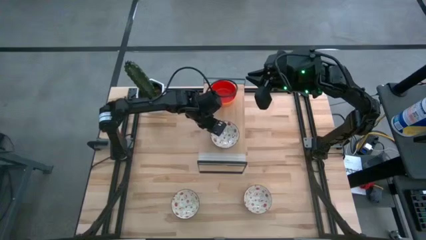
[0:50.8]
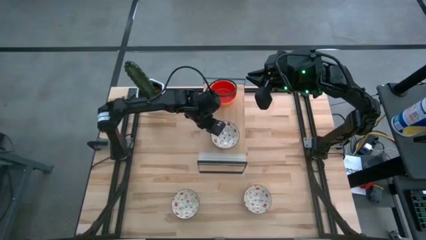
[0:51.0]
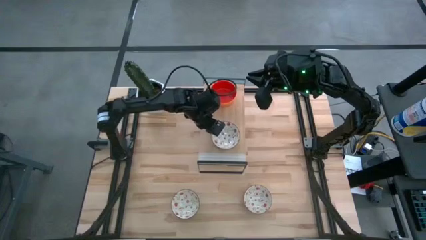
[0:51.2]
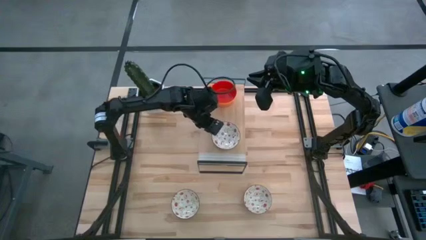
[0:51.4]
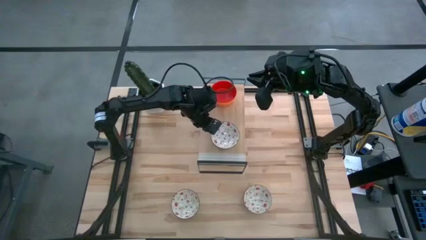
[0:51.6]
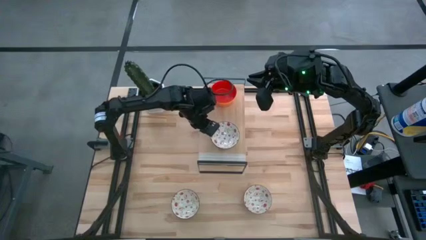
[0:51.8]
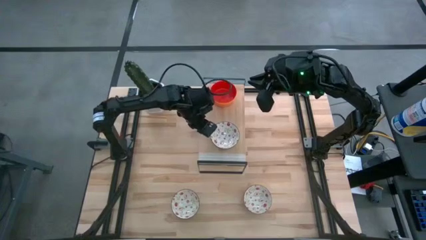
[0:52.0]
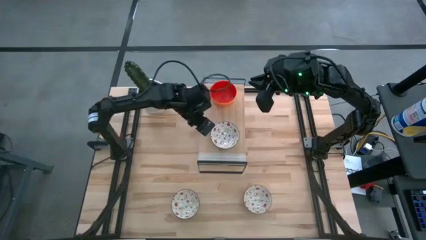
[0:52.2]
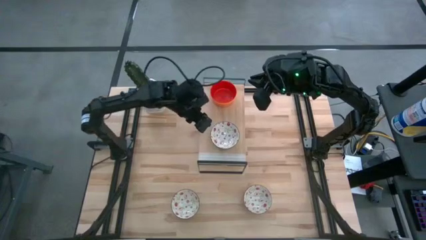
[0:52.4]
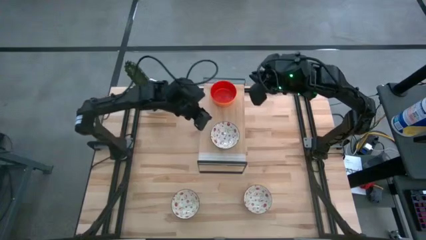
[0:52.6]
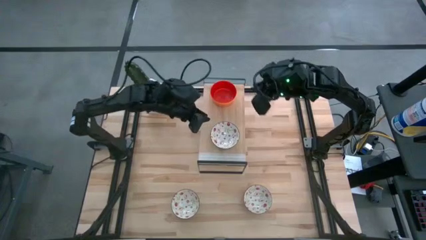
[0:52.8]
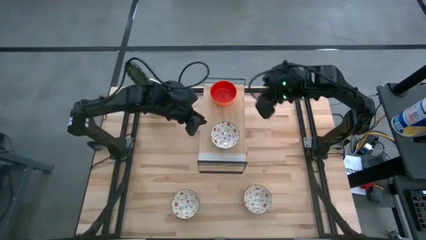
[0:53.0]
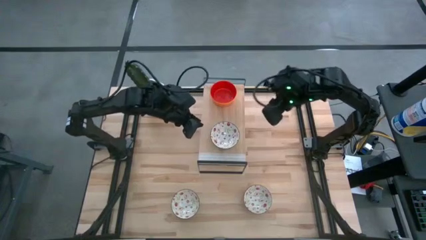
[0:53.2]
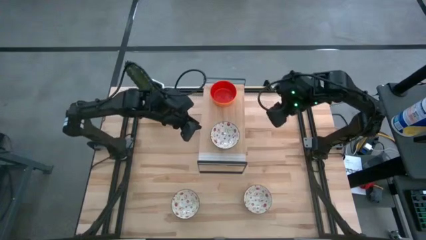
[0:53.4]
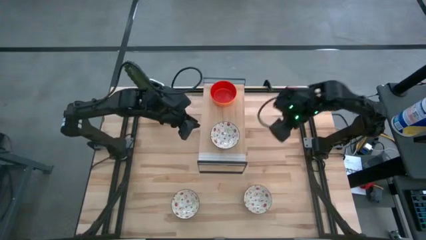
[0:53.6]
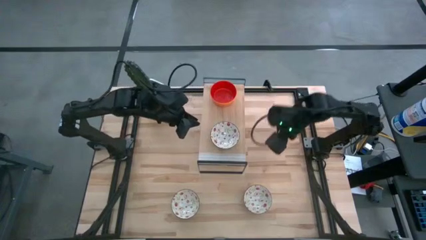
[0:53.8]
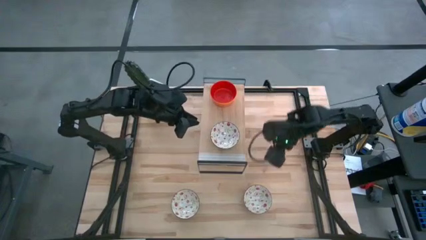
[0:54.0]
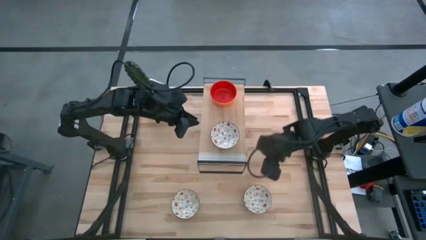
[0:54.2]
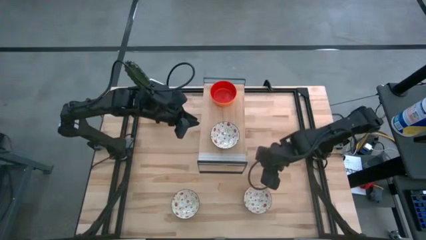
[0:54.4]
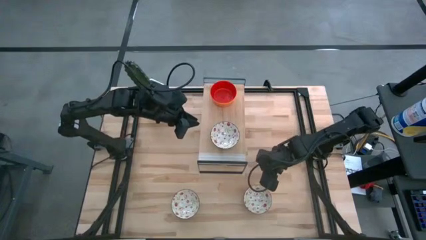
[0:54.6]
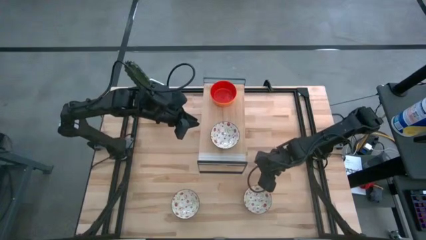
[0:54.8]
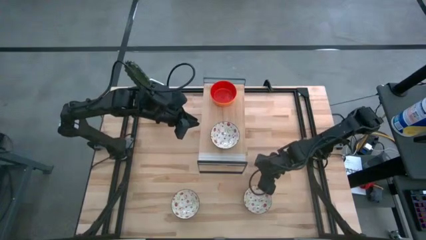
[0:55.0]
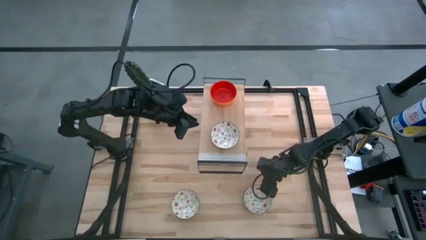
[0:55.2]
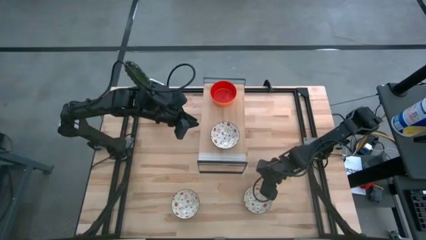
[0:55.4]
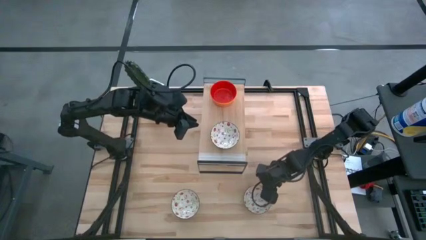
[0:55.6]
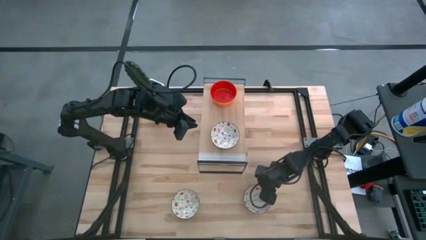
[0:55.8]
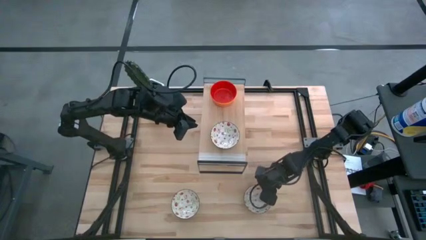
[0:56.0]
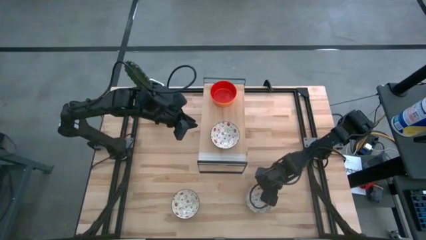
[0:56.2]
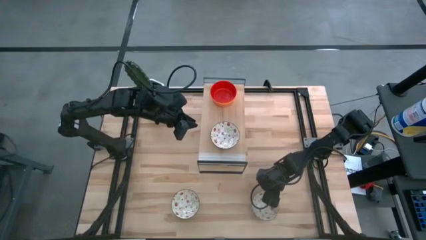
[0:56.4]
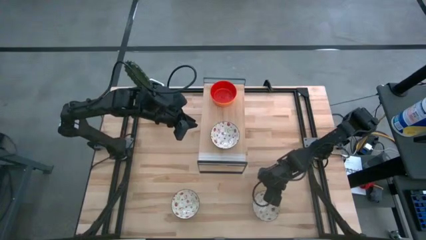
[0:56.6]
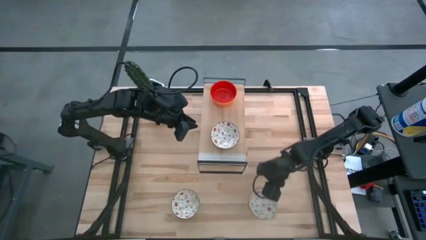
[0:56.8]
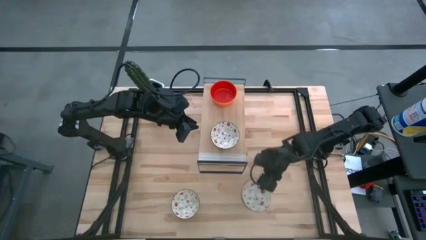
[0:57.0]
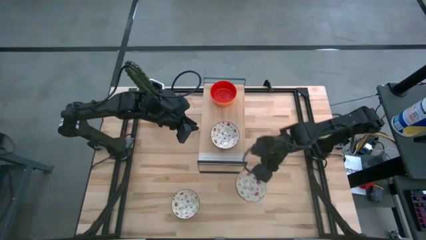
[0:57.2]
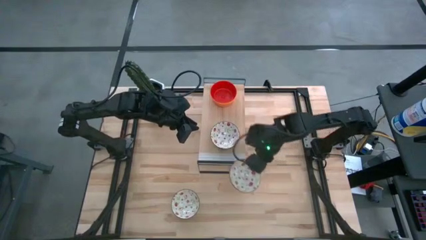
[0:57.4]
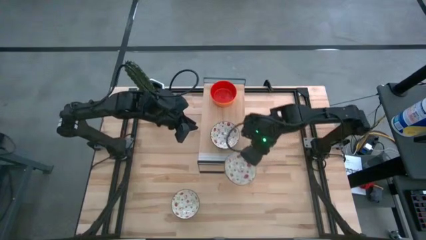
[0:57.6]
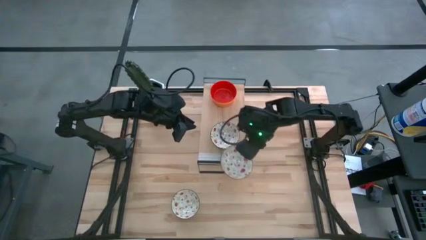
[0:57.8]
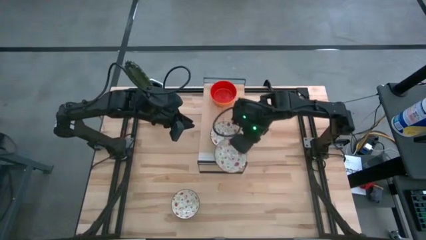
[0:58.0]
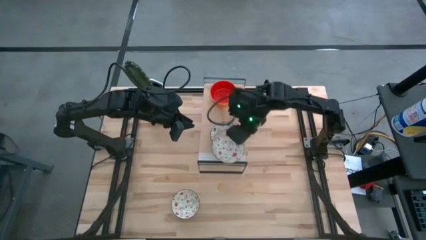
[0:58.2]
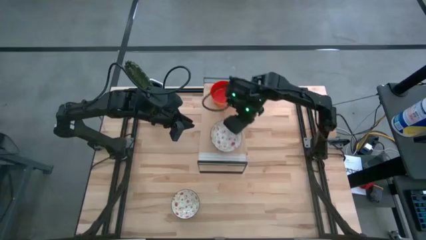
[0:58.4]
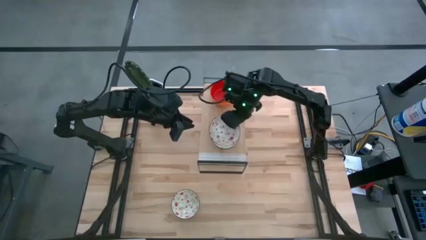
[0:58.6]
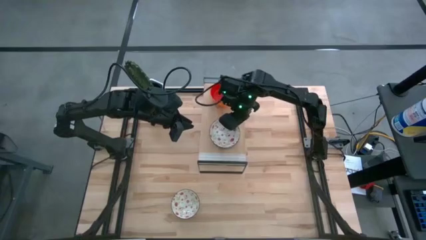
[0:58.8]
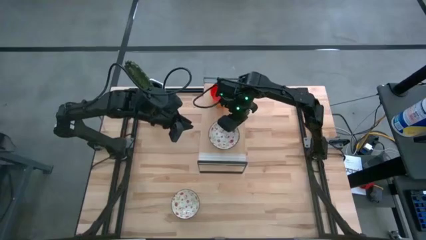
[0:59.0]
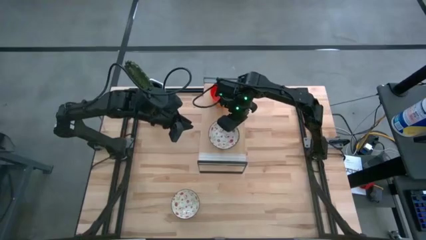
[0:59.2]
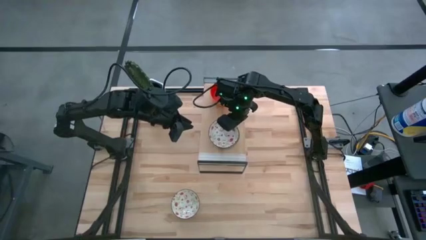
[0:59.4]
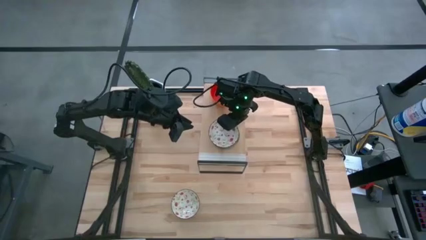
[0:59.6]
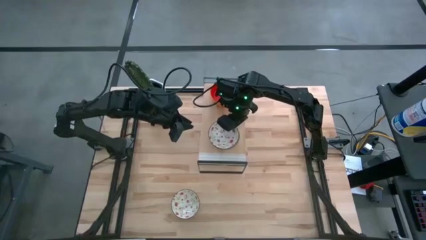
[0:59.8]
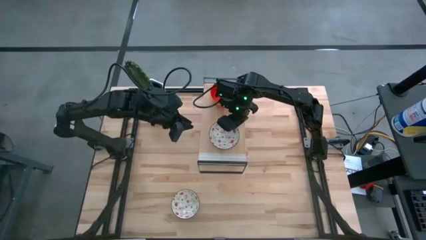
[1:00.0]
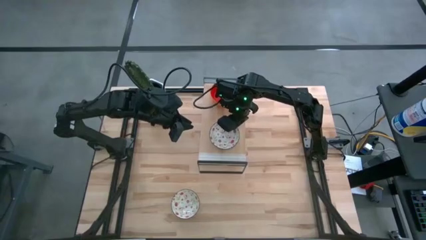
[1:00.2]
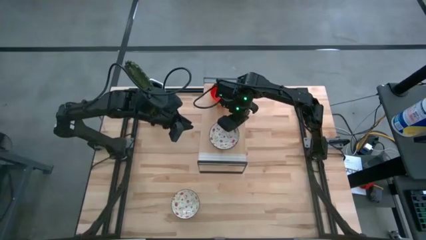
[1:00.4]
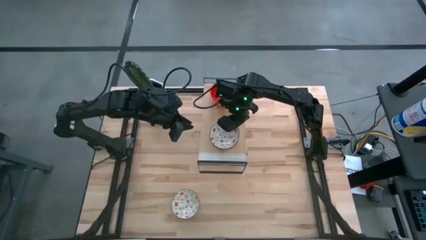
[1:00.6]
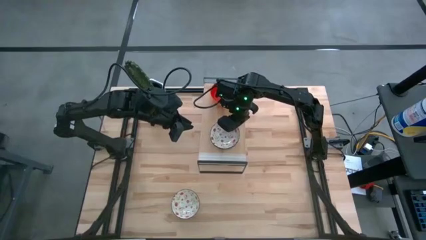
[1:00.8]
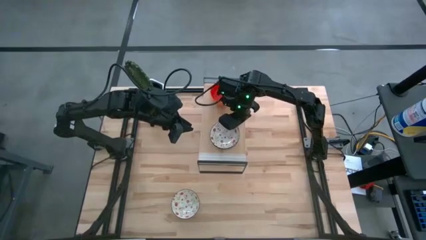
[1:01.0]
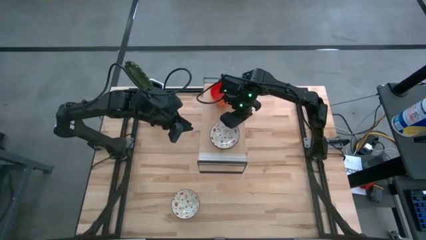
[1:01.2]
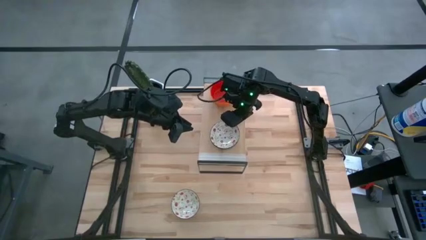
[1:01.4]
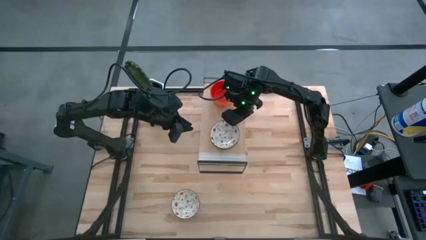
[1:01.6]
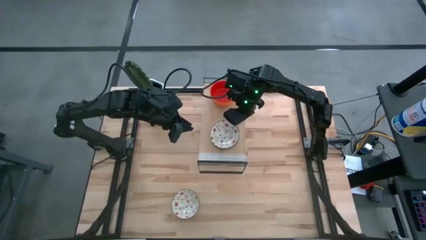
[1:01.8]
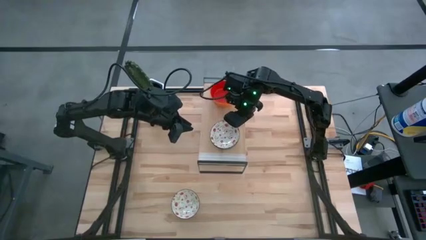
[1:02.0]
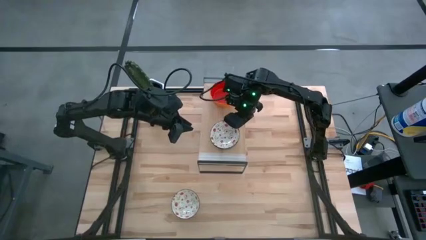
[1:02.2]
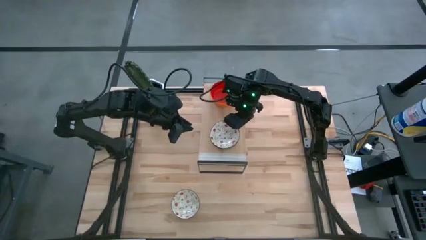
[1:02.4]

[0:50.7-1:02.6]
Task: Pick & Place Mini bowls
Stack the right white patterned bowl on the white patterned bowl on the shelf

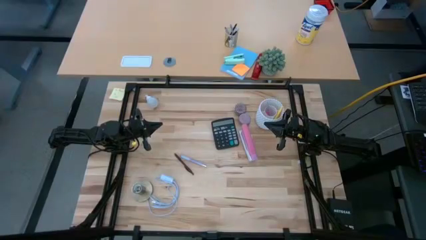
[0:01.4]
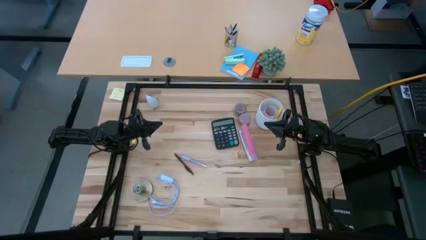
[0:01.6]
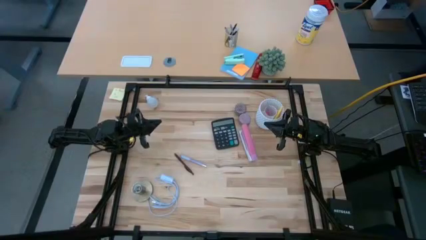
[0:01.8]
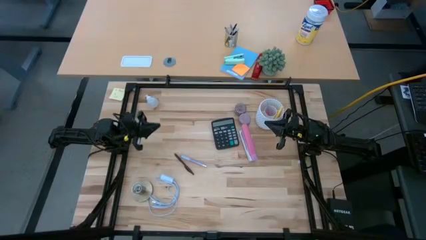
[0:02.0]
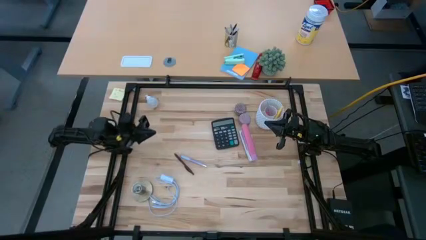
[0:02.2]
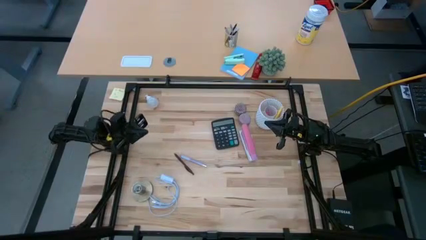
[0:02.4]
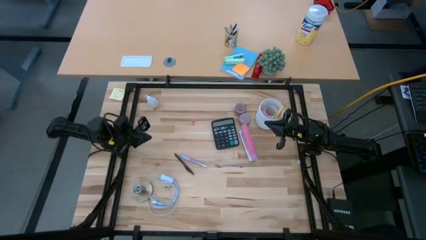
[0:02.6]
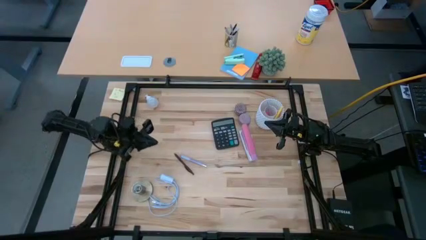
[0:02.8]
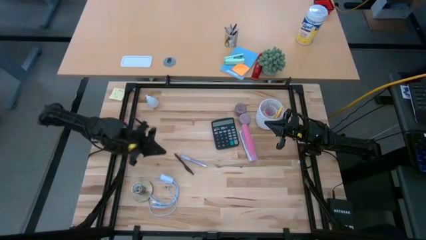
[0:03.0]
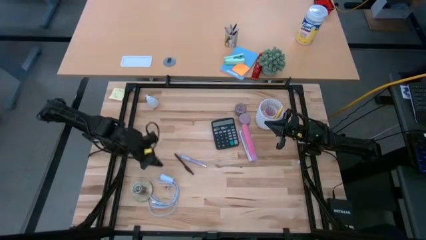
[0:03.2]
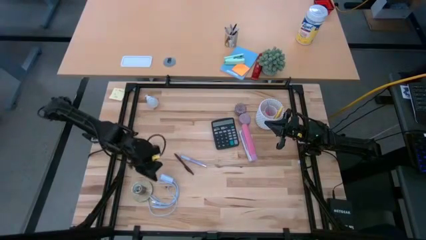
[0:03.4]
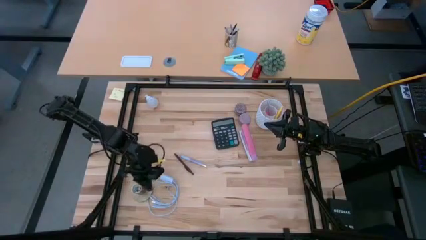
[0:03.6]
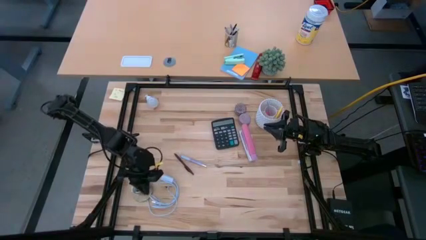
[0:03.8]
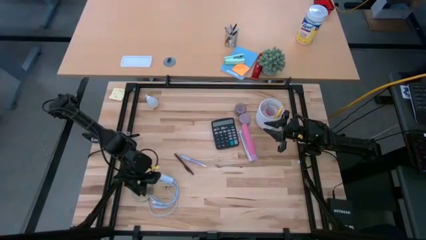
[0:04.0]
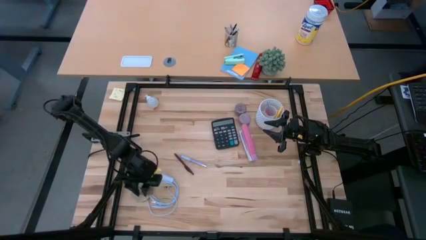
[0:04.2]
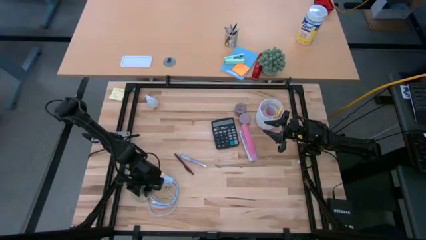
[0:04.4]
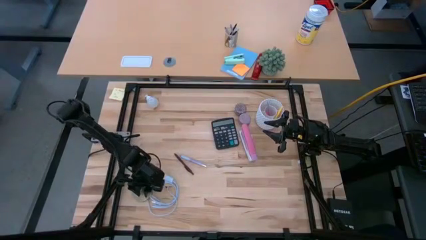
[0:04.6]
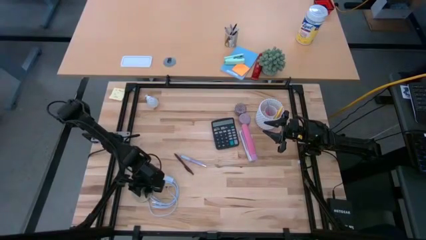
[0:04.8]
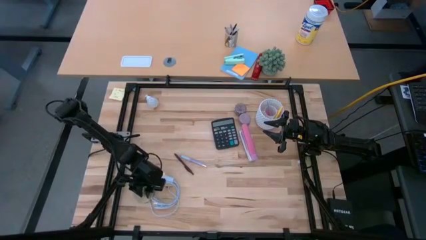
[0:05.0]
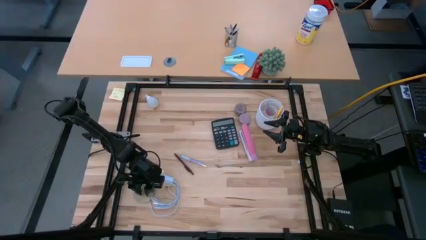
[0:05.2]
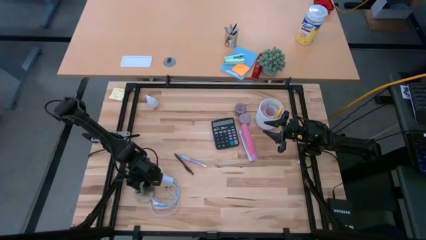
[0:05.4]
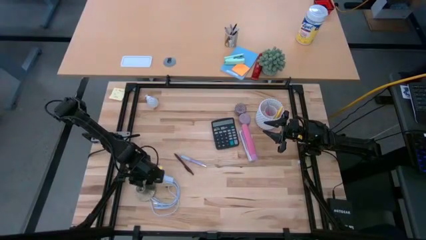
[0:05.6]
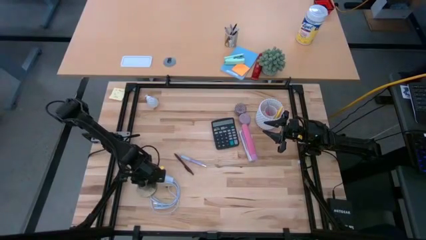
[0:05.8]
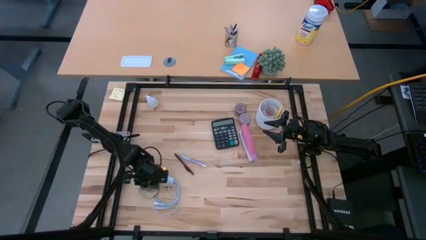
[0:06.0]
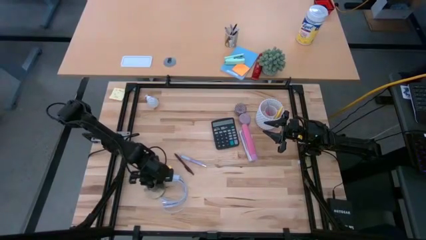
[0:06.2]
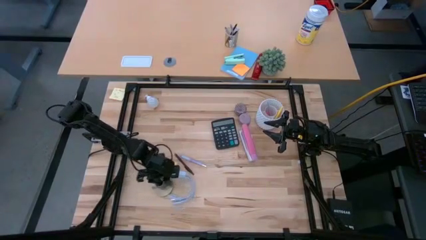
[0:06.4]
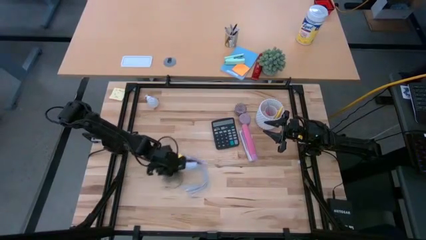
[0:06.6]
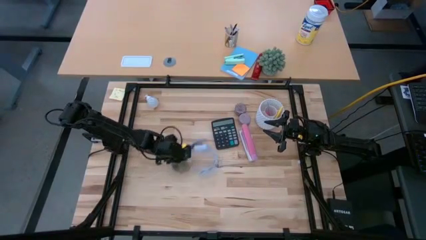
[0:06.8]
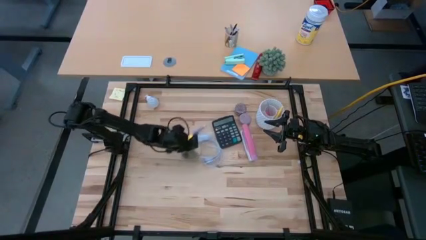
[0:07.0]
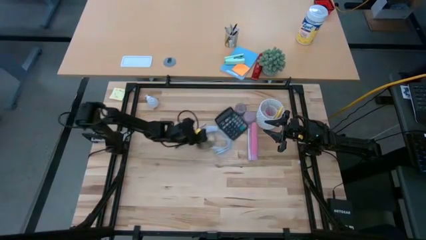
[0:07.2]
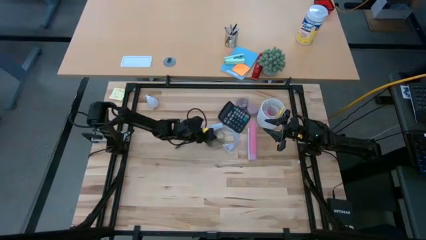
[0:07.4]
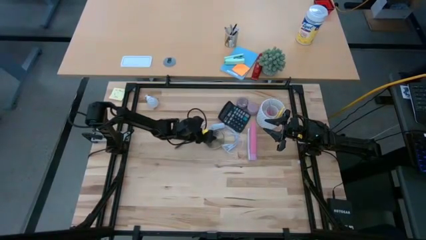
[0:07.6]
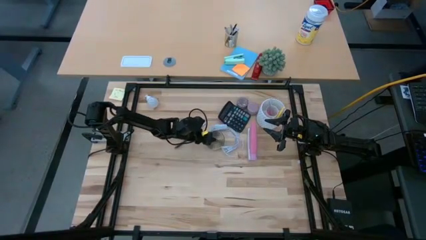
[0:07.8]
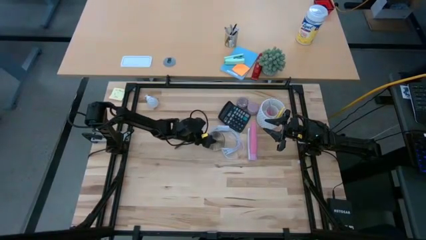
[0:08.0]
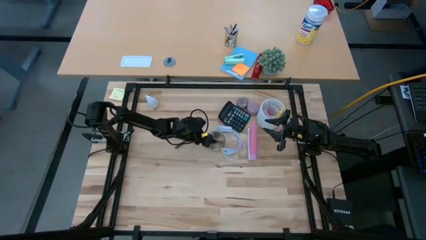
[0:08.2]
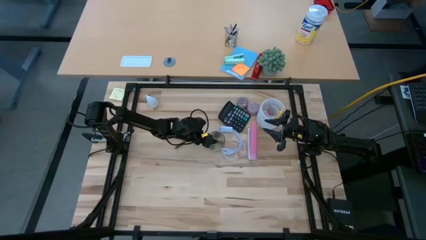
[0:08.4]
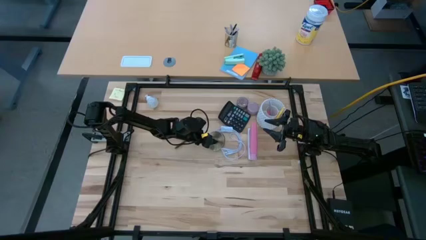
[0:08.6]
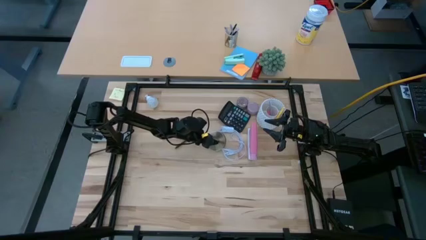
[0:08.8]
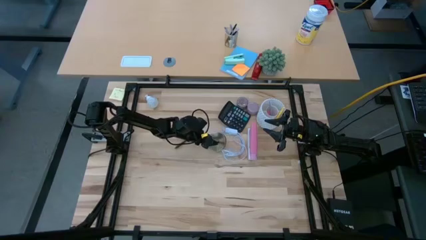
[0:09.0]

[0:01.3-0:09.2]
Task: Screw lightbulb
Move the gold lamp to the center of the table
